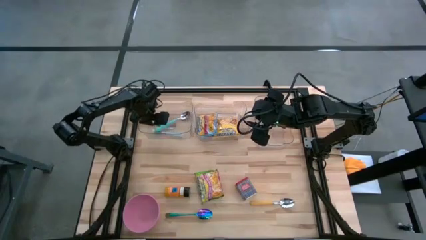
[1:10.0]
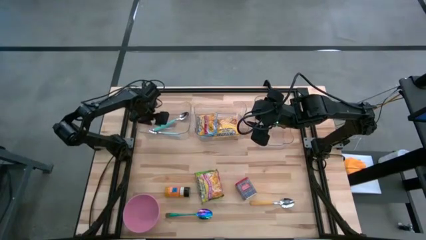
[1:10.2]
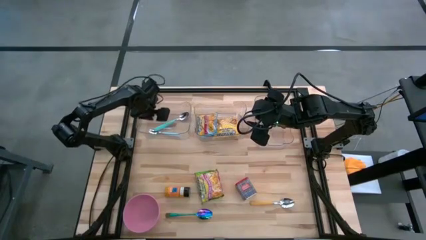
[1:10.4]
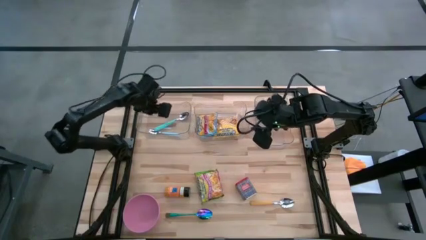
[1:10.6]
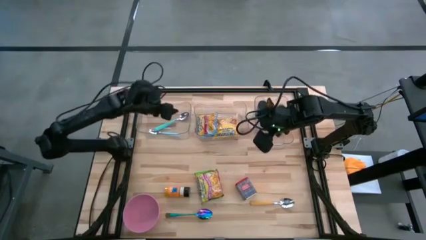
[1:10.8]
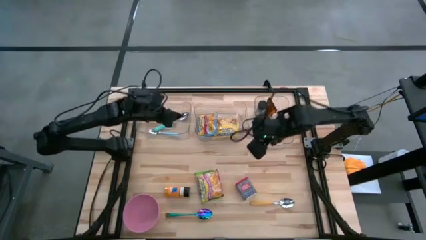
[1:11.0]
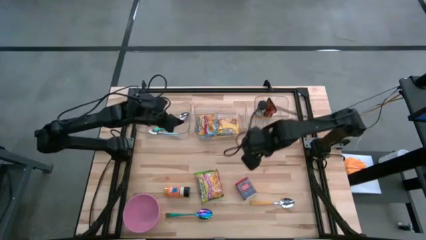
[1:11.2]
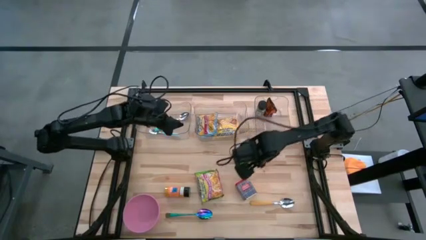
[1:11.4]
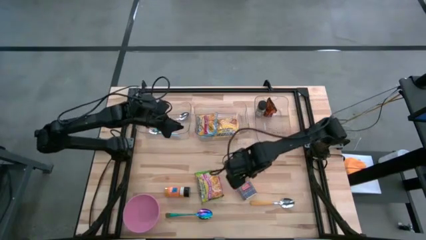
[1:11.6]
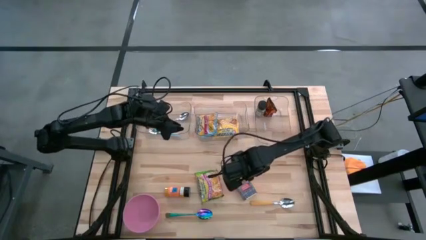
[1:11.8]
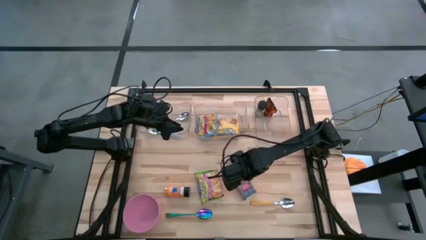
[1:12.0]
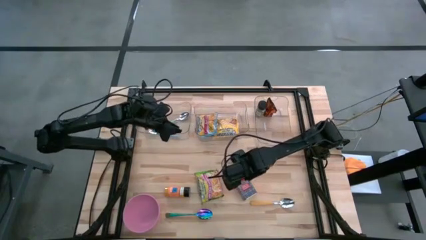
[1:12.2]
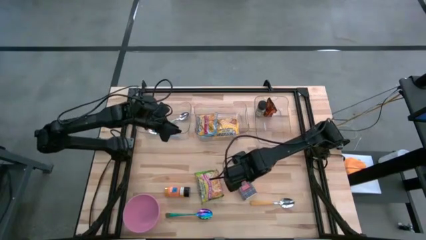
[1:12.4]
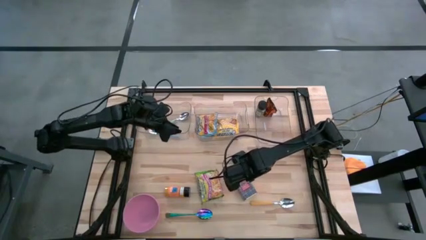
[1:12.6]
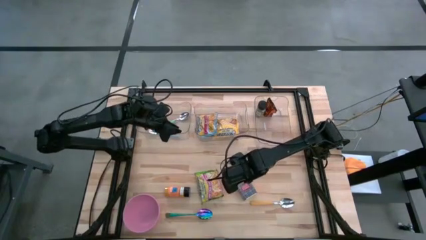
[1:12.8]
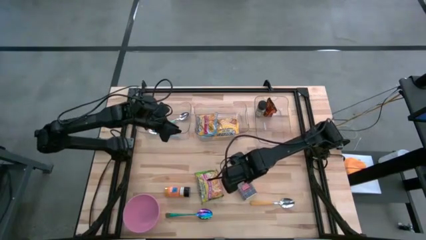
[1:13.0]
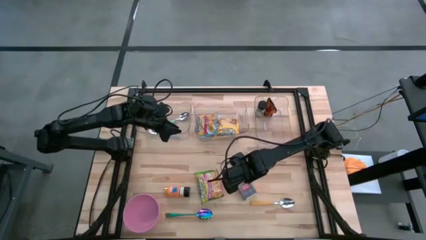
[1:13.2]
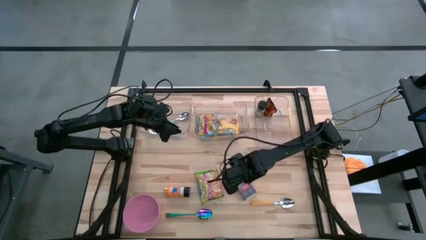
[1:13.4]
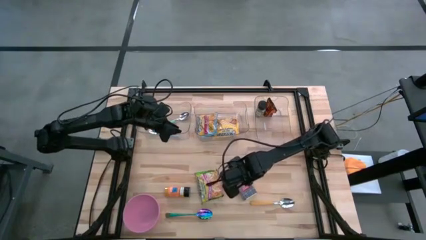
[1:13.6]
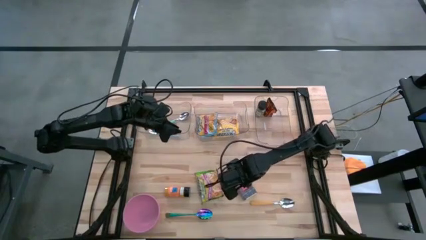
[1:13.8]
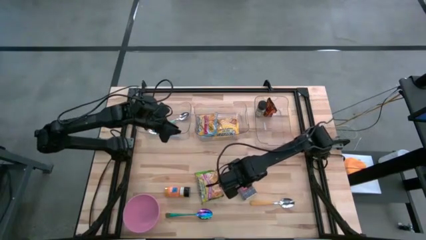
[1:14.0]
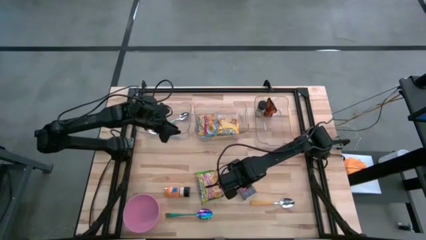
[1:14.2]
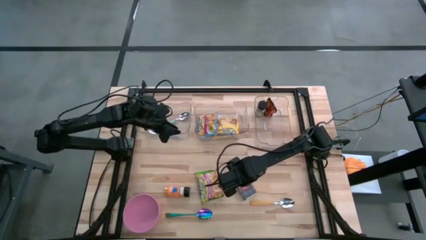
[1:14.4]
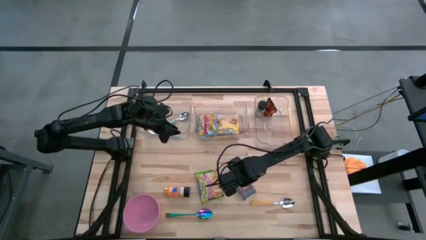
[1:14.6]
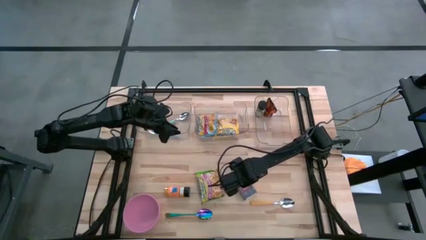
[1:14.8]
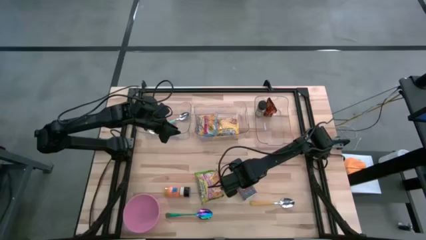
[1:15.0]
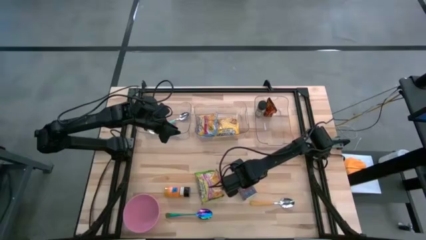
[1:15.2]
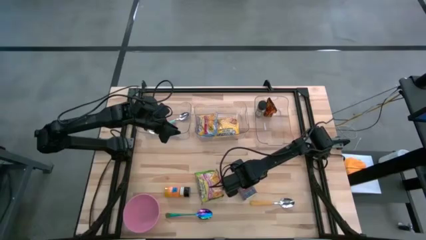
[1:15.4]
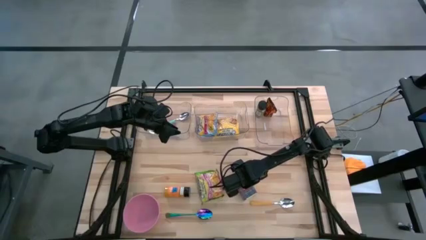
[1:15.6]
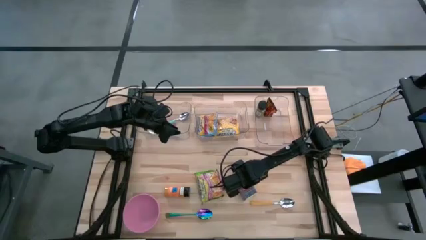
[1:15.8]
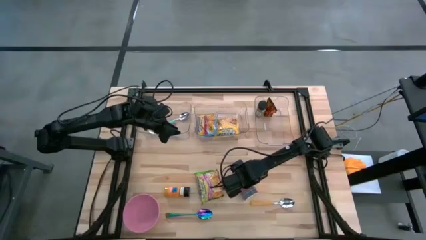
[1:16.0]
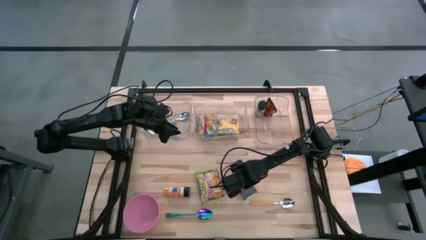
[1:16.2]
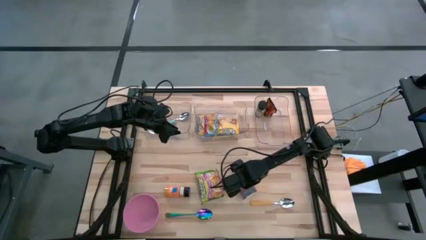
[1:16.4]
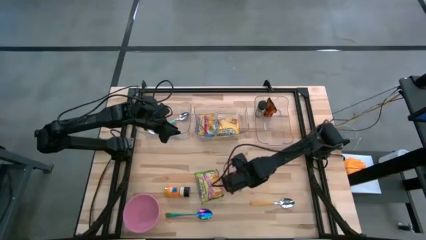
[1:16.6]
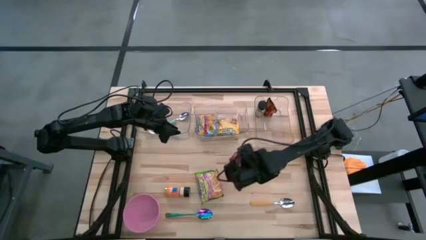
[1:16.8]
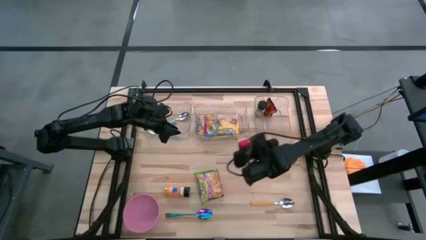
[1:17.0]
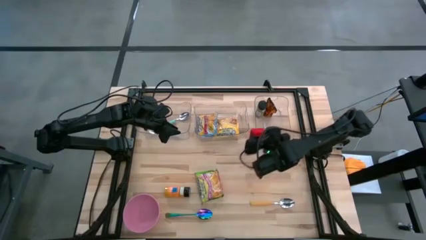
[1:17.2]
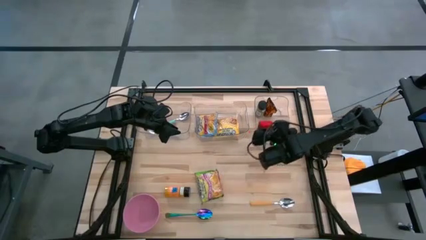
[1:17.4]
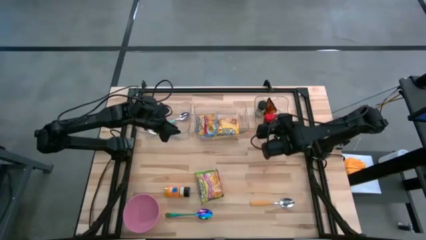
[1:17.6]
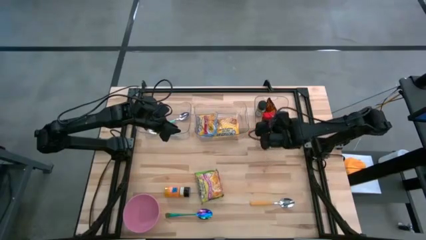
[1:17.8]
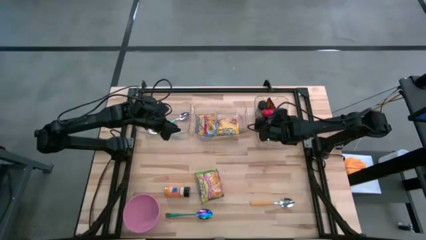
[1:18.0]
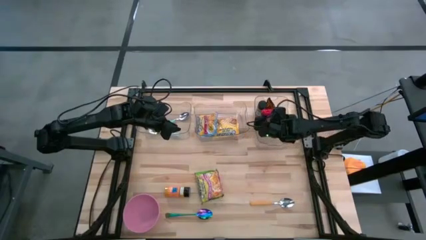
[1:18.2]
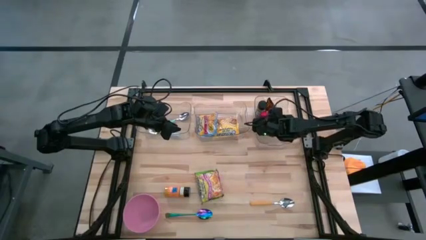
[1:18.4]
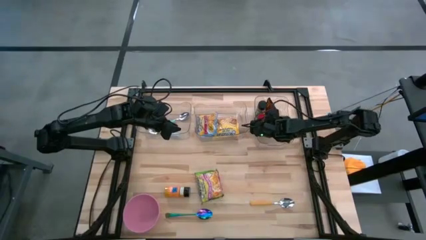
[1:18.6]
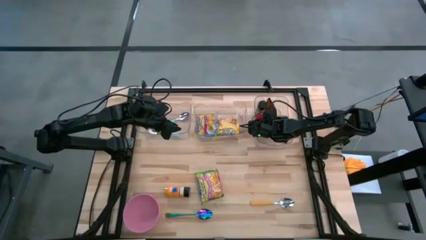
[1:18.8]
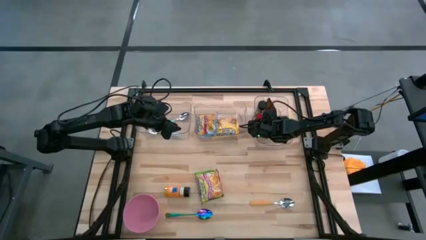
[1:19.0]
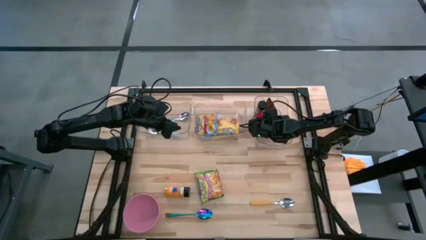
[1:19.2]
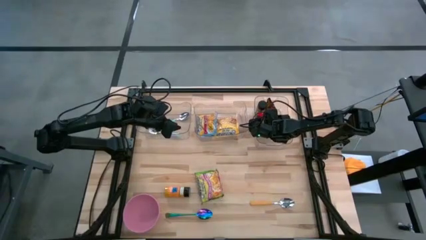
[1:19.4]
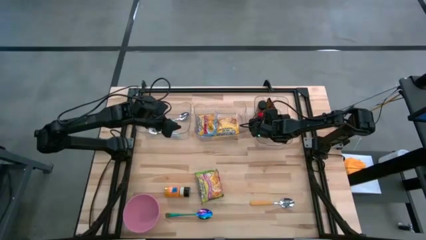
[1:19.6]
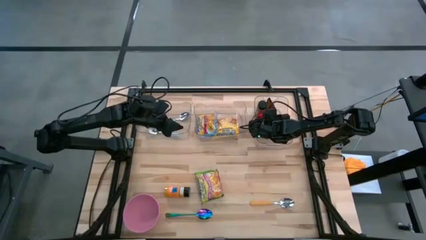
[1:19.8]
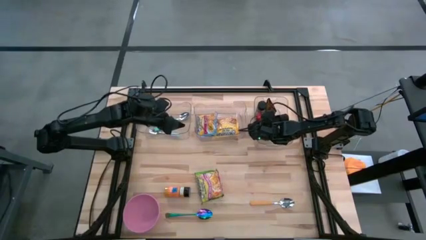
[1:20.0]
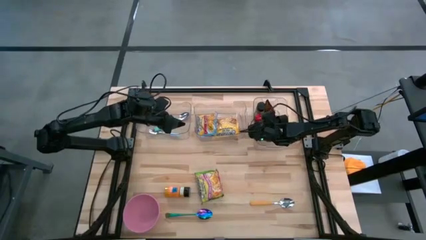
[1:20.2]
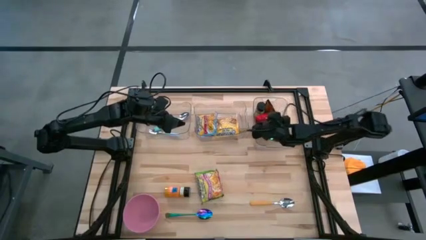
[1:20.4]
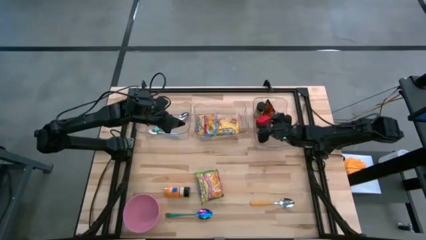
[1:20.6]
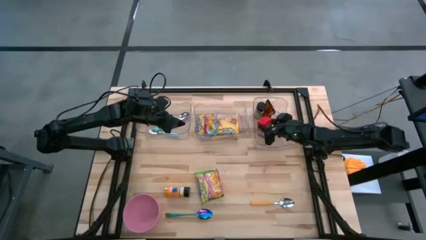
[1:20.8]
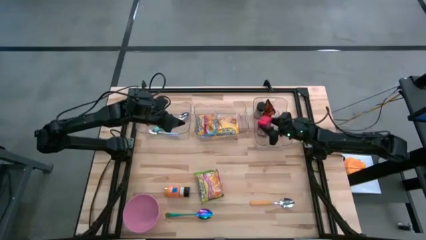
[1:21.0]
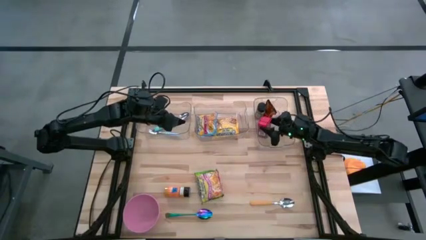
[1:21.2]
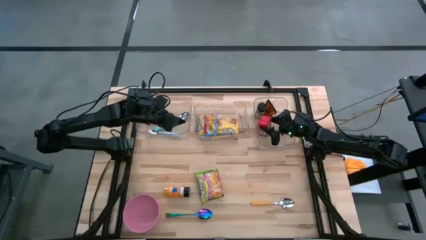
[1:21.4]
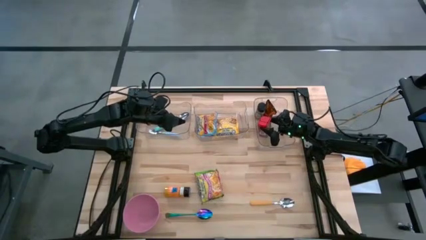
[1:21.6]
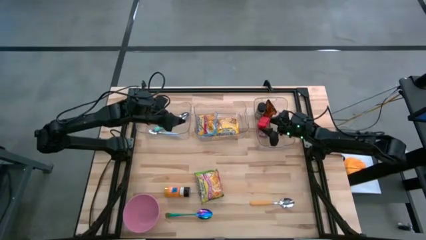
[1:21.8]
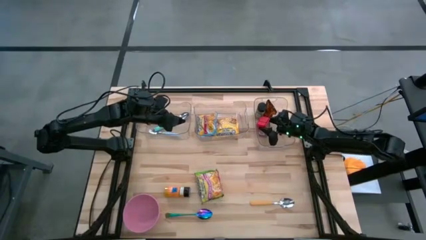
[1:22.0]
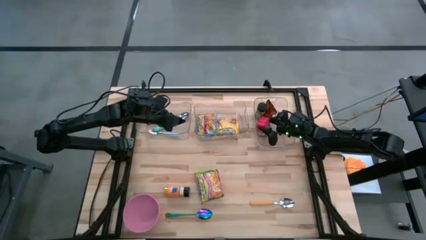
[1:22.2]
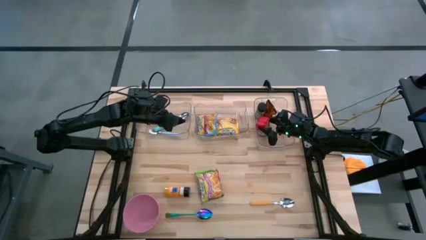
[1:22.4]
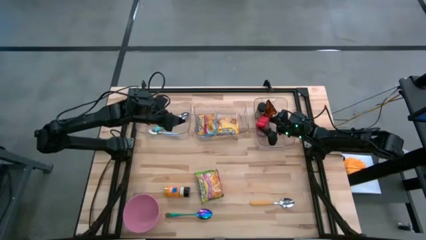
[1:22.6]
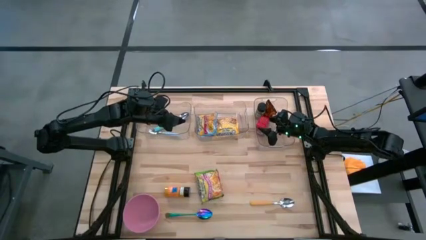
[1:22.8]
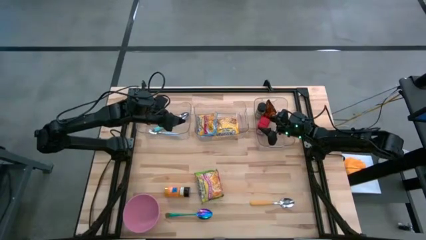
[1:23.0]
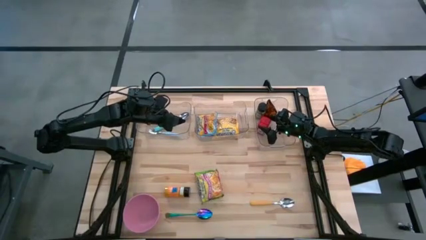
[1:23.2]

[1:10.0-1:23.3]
Put the red seasoning can into the right transparent bin

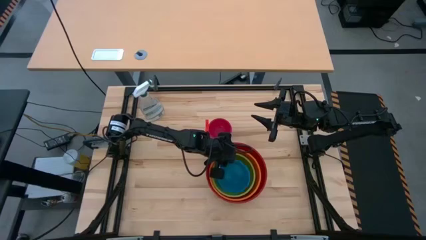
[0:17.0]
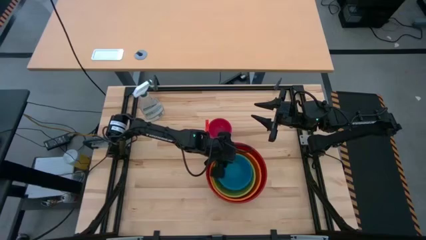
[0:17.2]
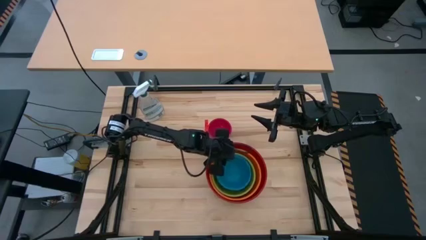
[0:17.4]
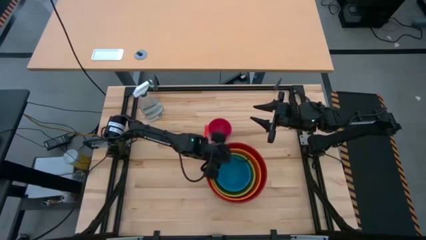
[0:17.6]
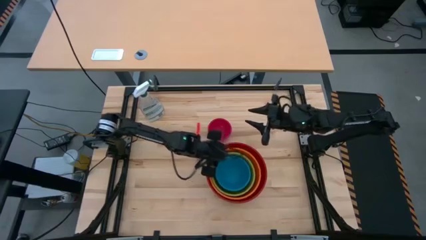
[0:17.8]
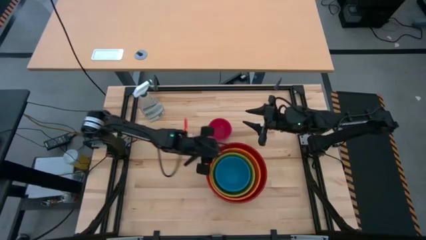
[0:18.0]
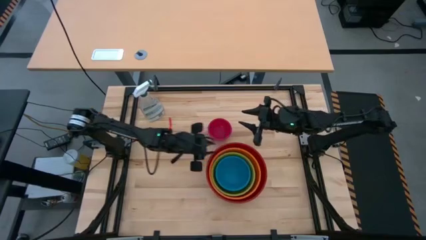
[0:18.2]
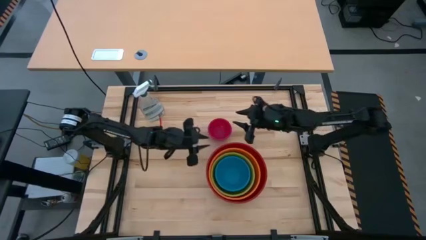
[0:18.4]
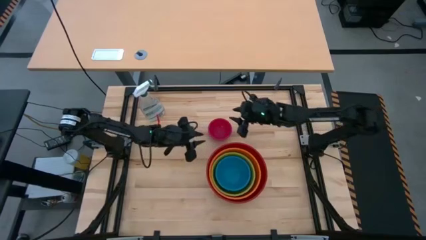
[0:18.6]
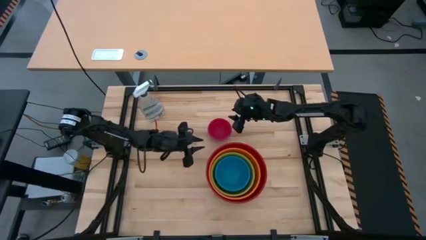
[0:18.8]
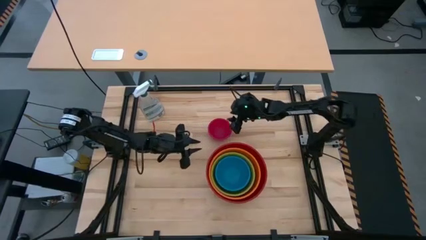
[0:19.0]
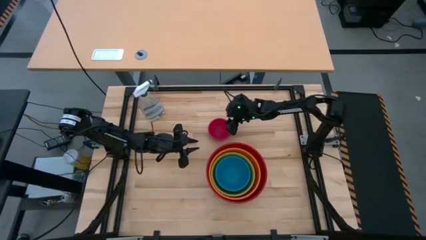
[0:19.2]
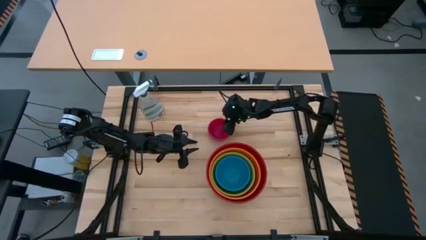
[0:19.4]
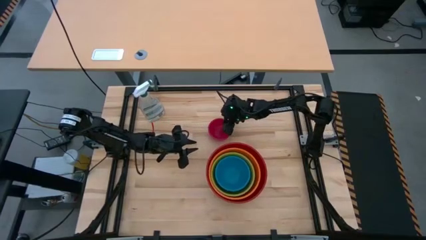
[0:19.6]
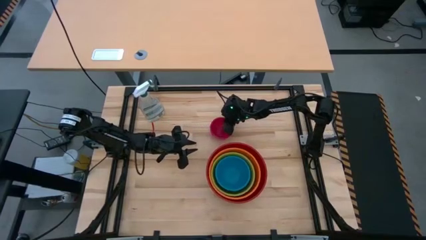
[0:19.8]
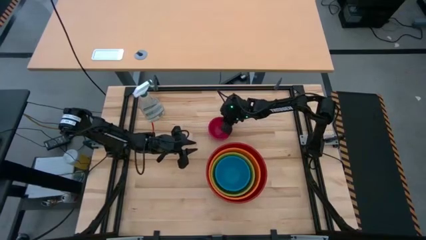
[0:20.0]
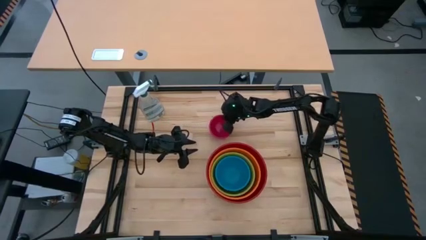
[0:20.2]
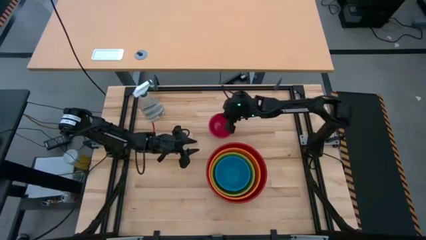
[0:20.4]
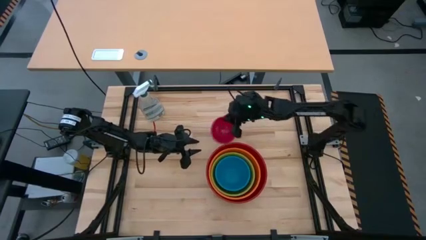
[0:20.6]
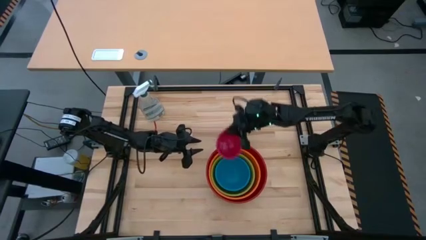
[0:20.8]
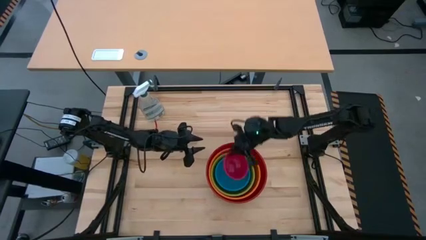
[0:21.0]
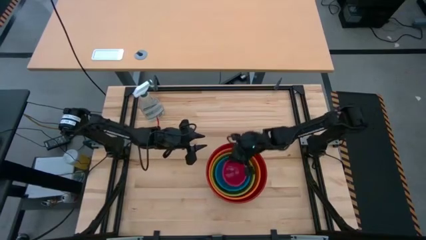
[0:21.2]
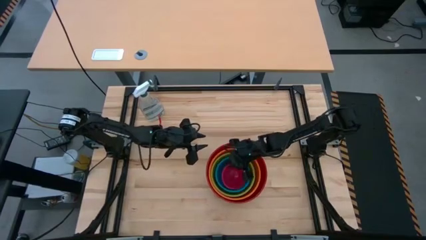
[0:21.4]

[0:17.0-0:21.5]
Stack the pink bowl into the blue bowl
